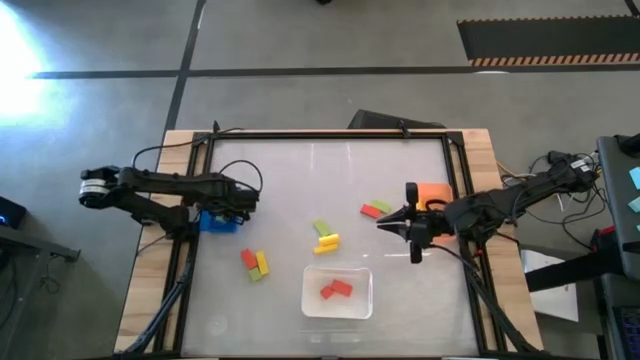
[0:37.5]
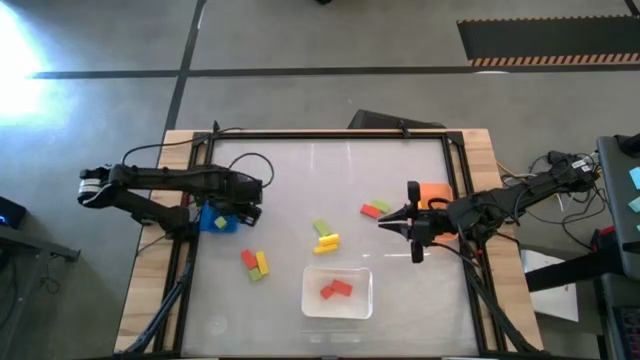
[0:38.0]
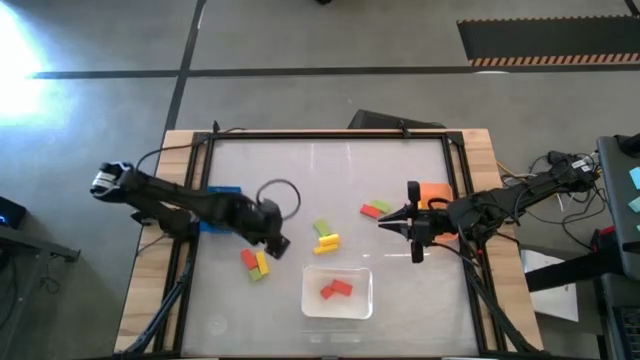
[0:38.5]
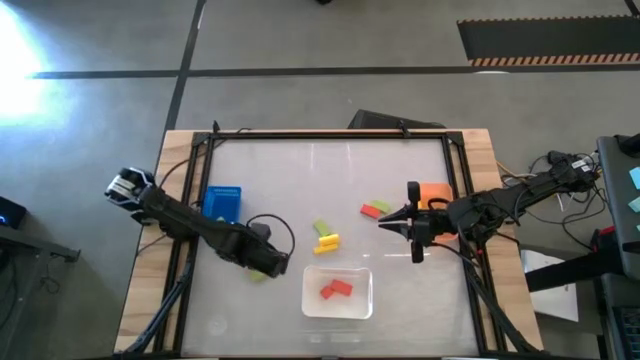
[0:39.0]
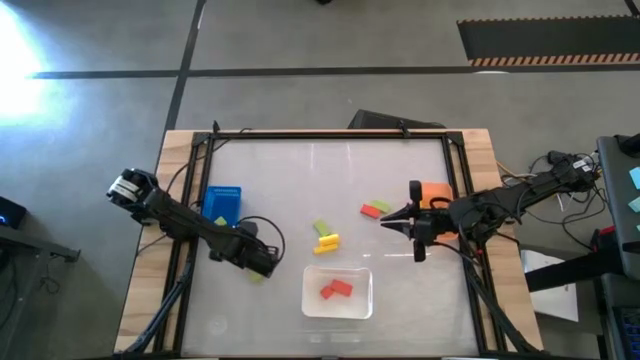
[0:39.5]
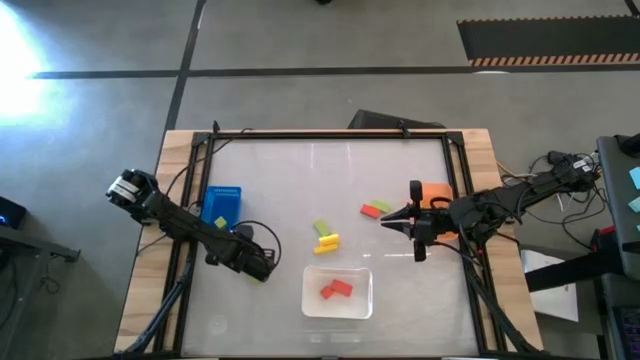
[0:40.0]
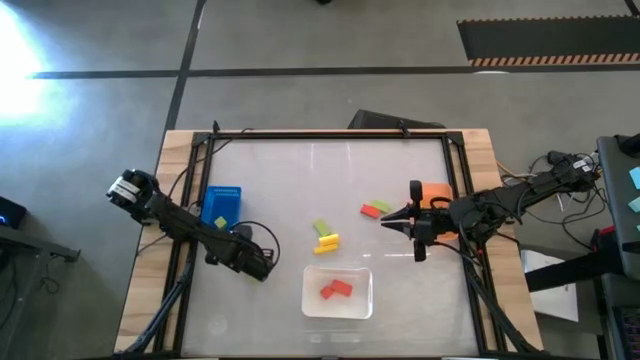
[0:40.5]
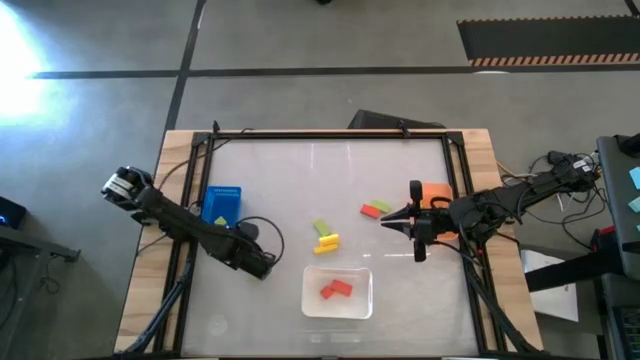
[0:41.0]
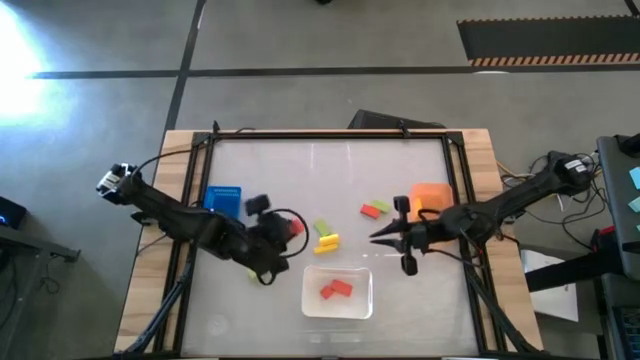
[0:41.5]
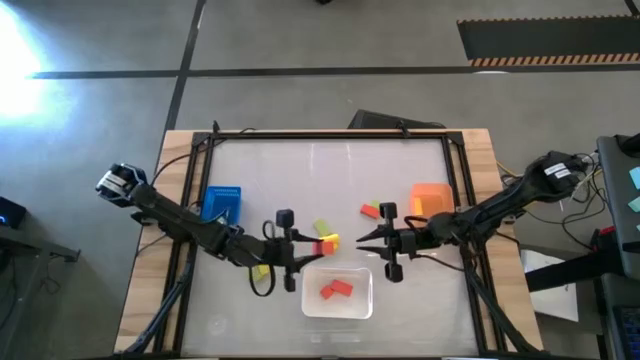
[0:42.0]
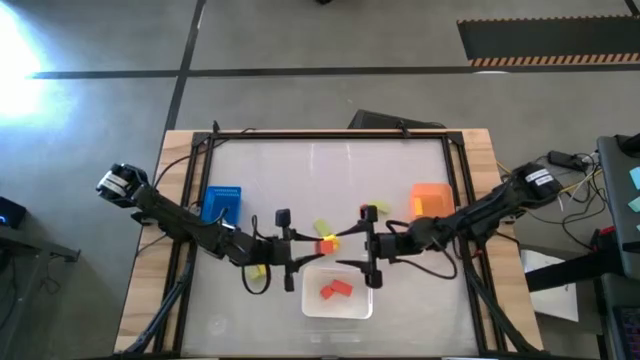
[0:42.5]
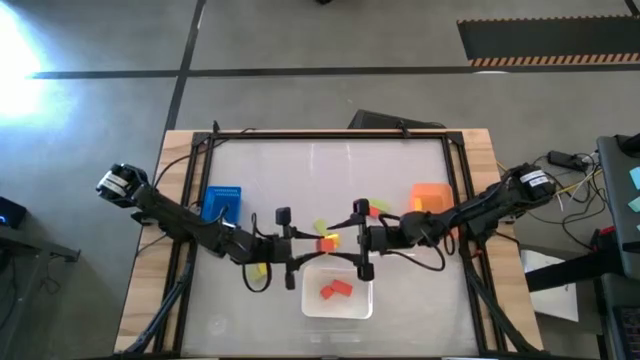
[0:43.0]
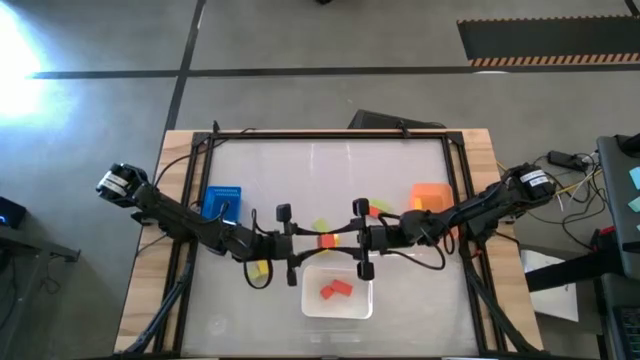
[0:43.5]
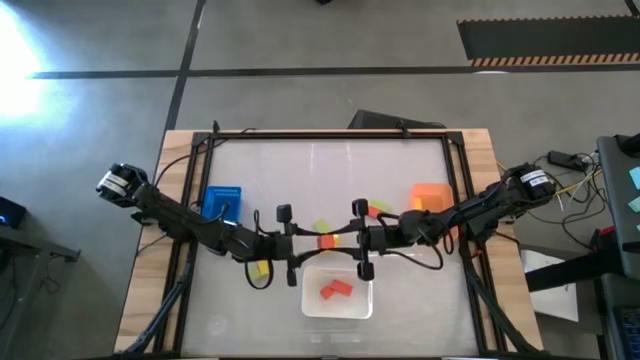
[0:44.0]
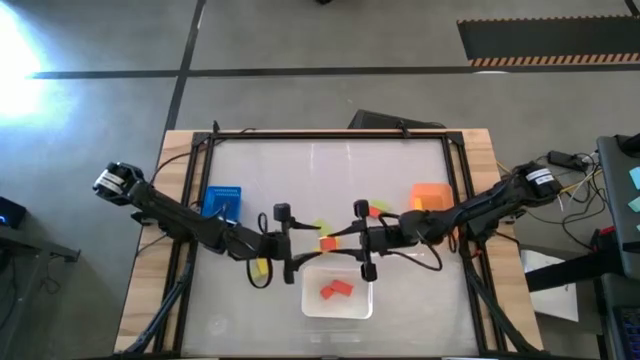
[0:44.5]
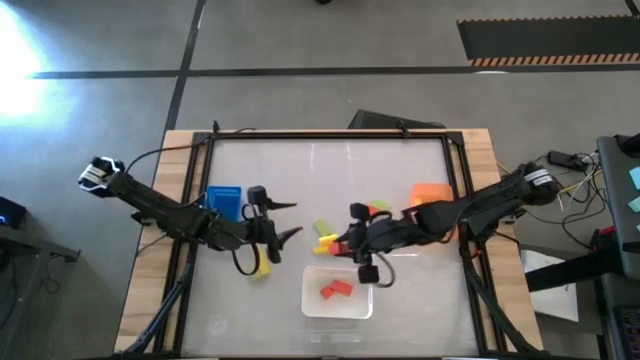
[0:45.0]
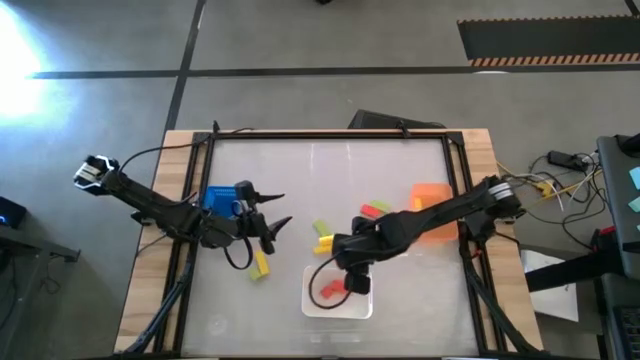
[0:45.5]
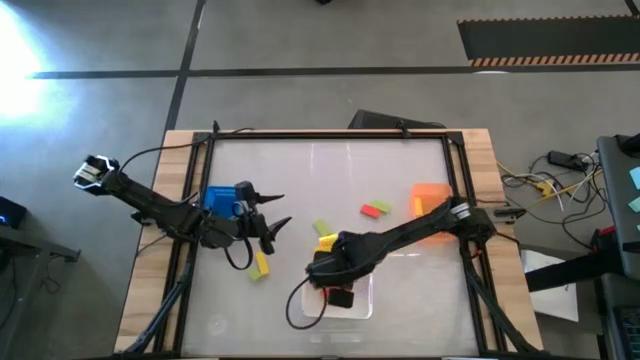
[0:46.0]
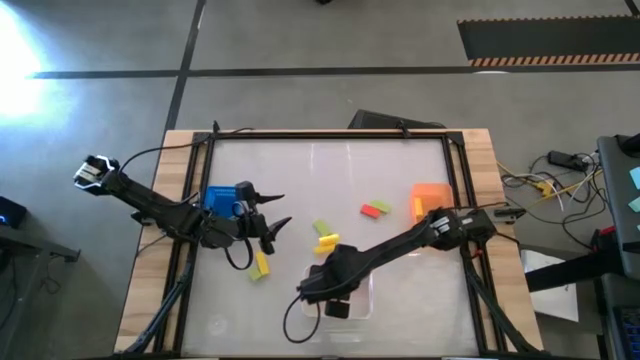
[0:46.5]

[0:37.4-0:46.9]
Task: Sort & place blocks by color
Put the orange block into the white bin

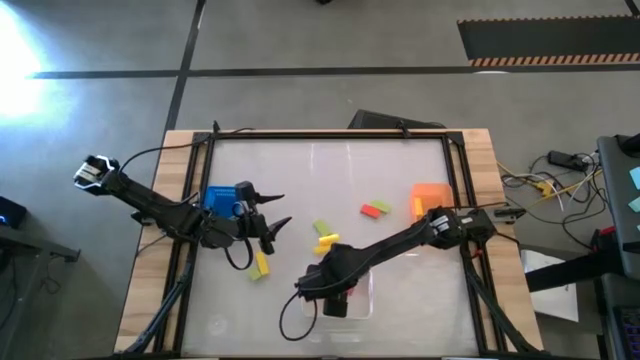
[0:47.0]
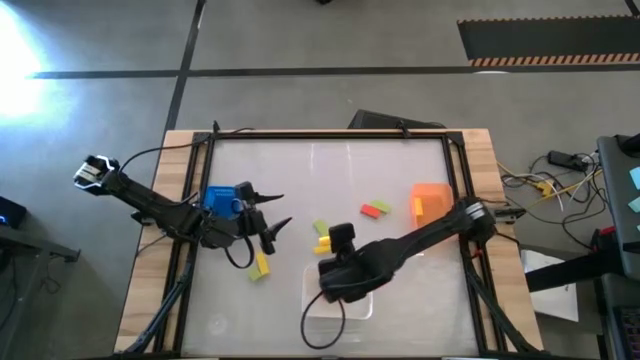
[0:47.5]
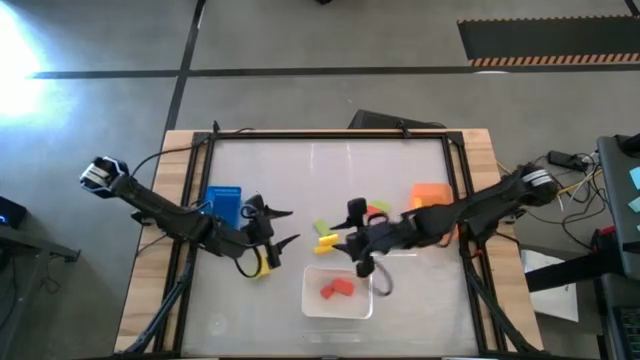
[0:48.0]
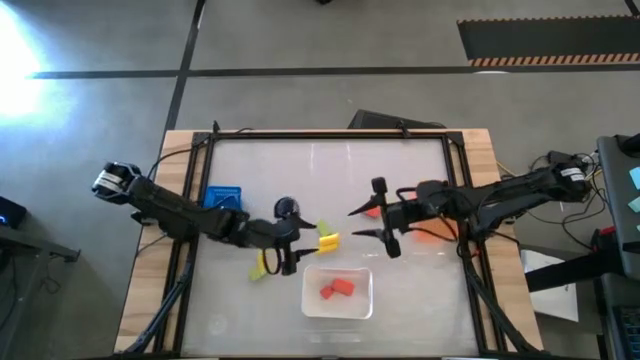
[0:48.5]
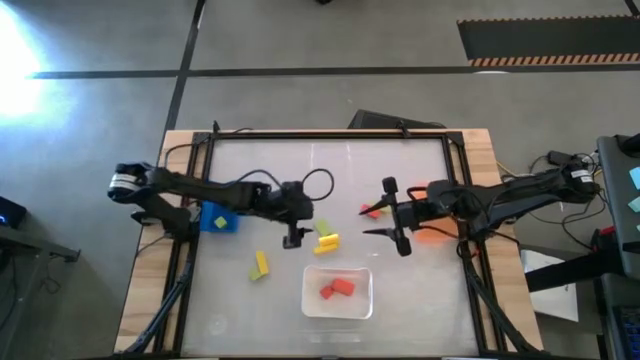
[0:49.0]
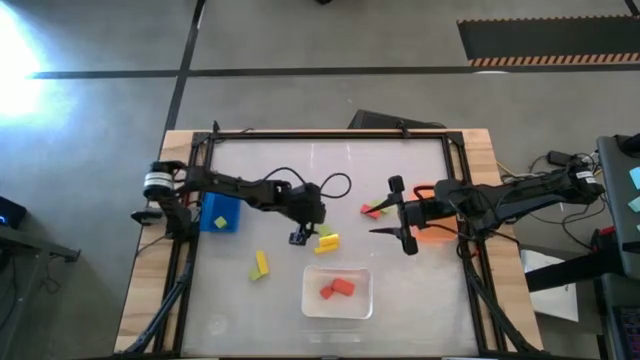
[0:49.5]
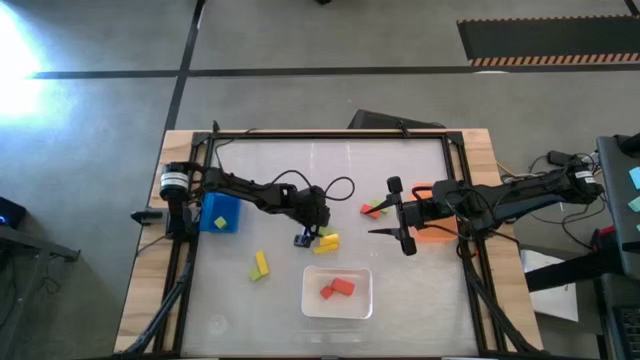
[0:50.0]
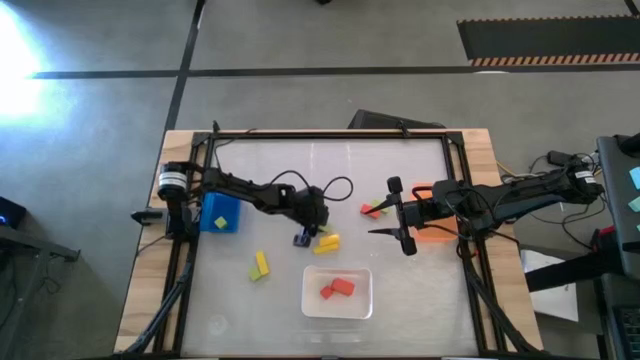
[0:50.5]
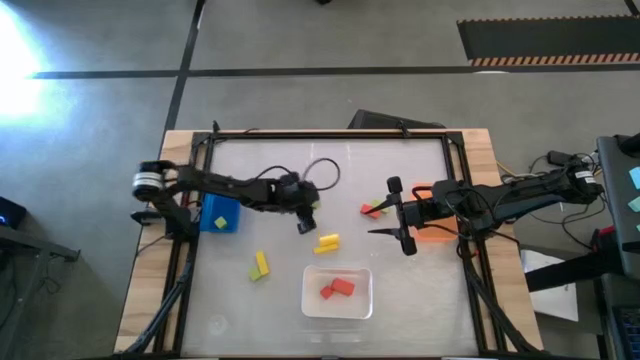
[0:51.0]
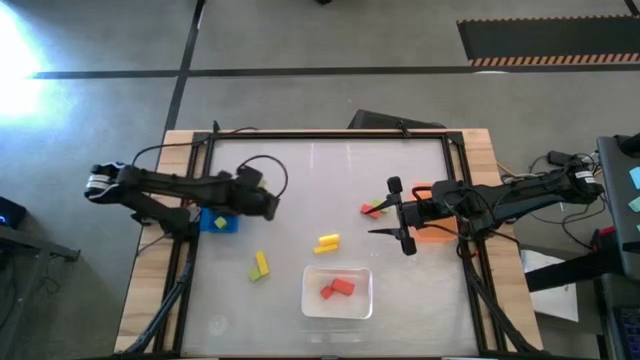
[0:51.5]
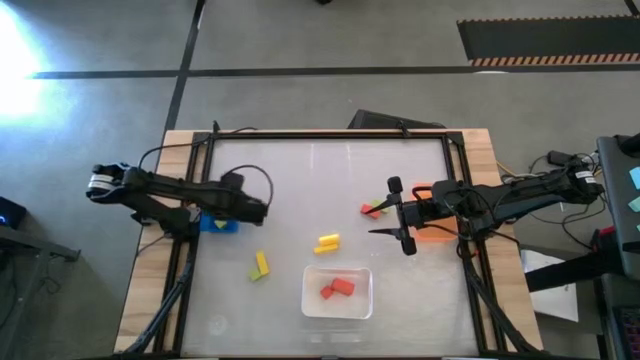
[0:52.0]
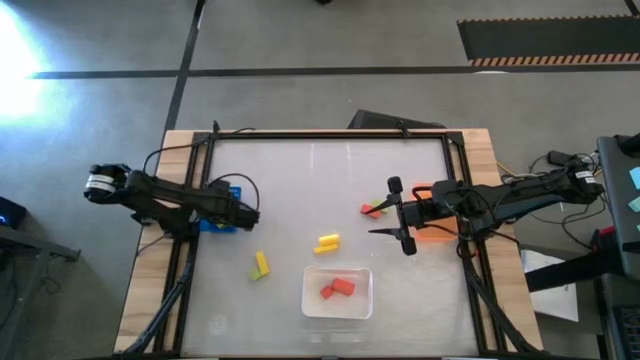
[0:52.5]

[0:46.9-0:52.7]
Put the green block into the blue bin

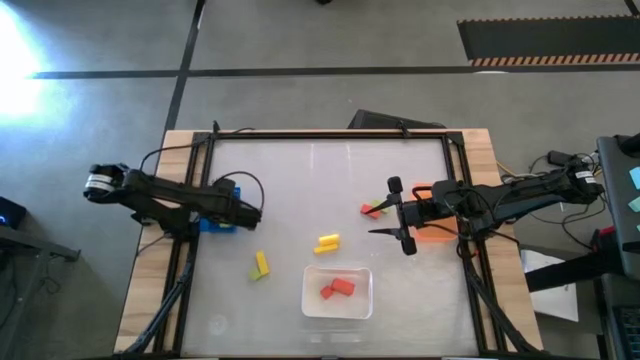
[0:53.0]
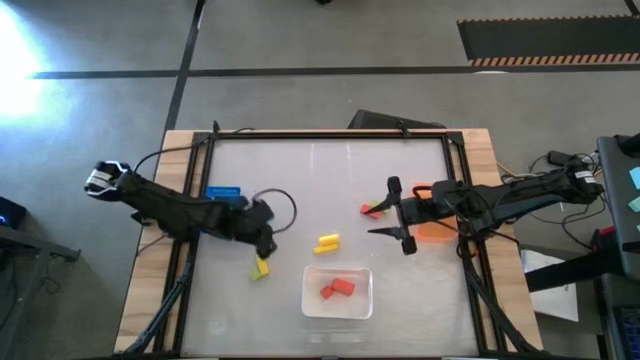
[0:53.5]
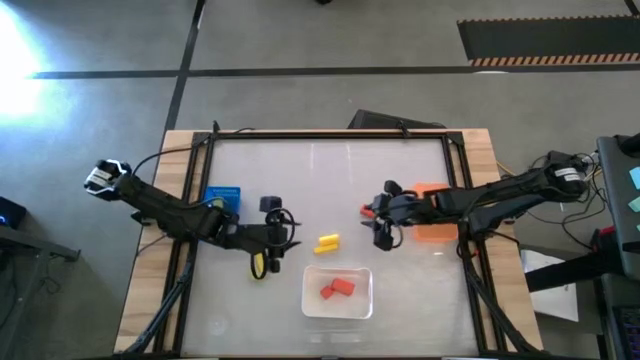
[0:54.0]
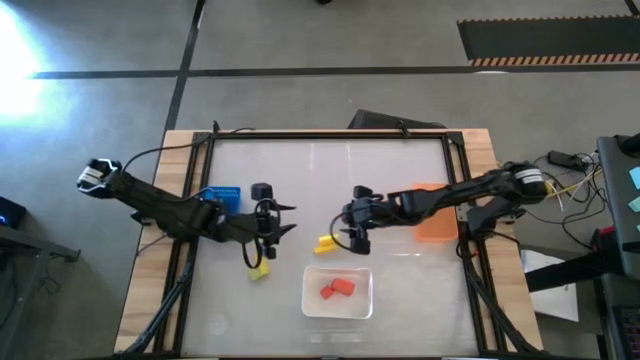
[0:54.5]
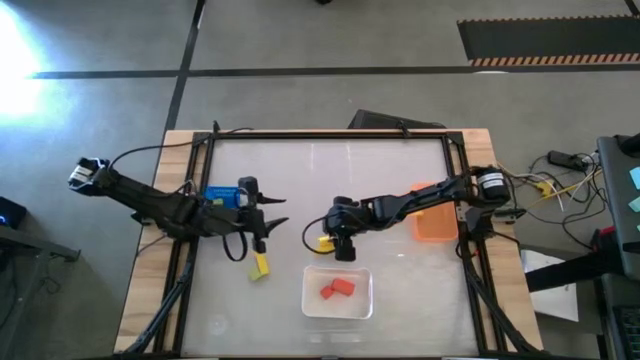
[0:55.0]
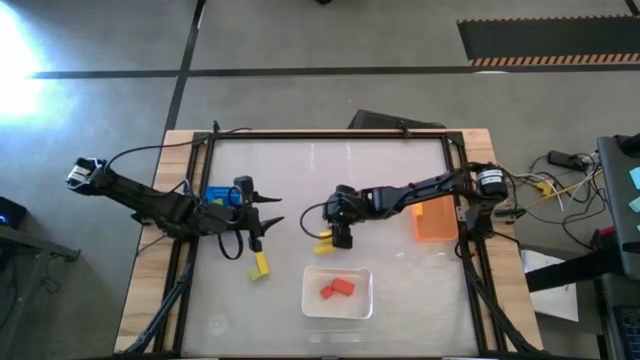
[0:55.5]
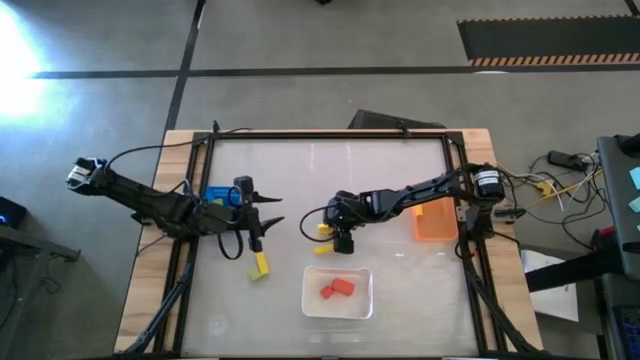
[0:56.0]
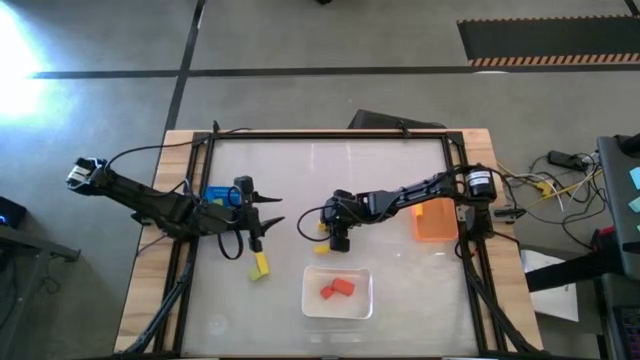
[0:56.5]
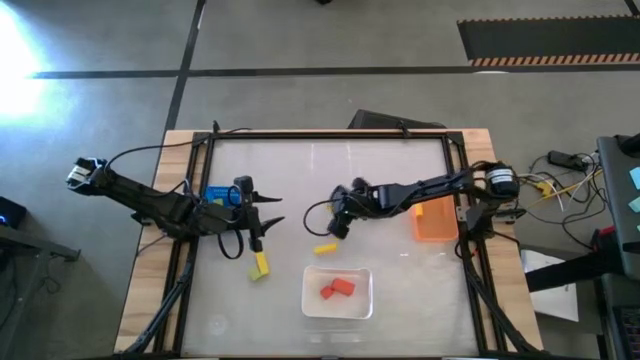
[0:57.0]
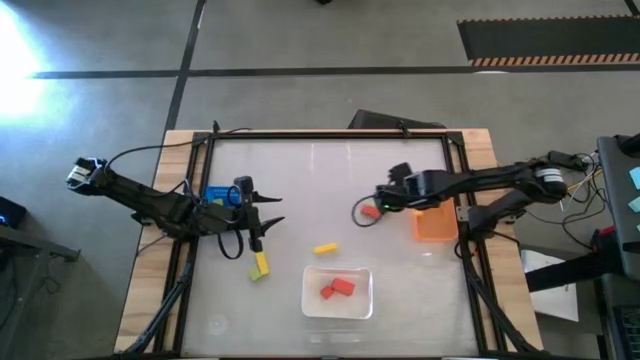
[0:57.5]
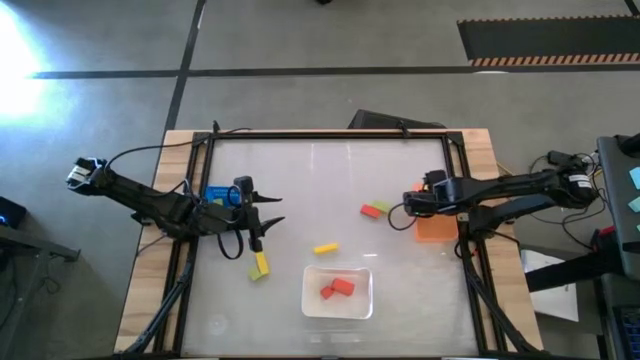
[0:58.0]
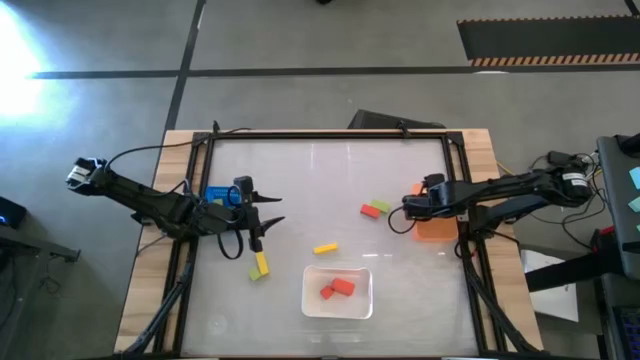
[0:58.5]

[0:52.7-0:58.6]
Put the yellow block into the orange bin
